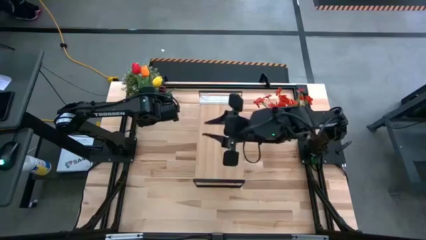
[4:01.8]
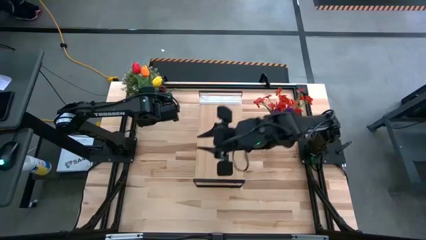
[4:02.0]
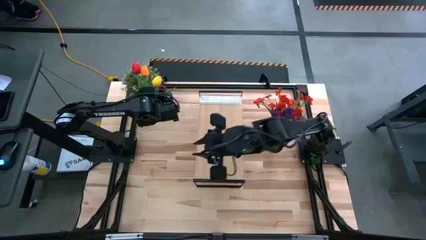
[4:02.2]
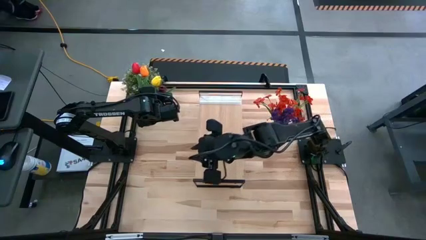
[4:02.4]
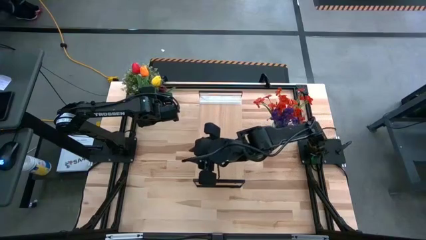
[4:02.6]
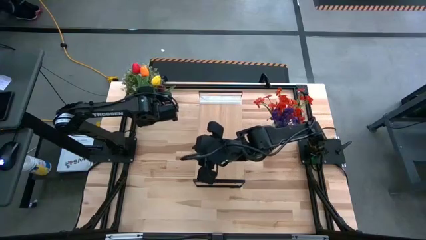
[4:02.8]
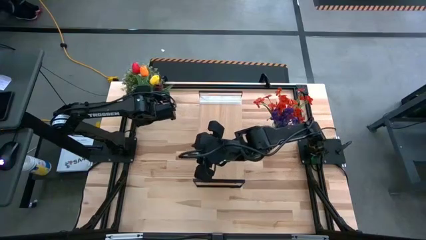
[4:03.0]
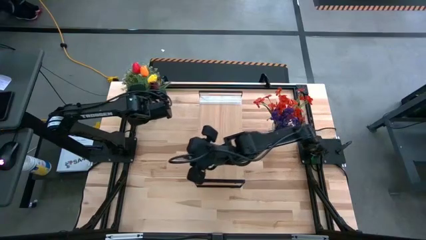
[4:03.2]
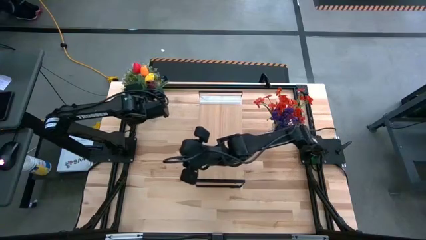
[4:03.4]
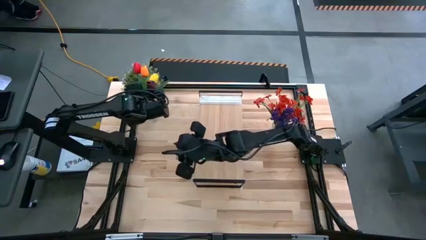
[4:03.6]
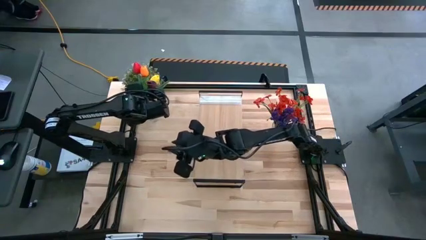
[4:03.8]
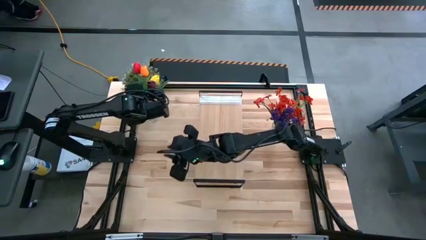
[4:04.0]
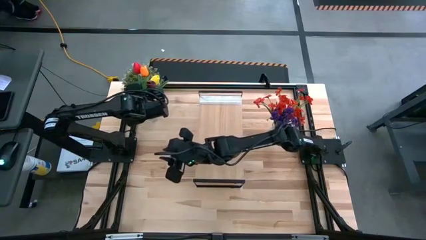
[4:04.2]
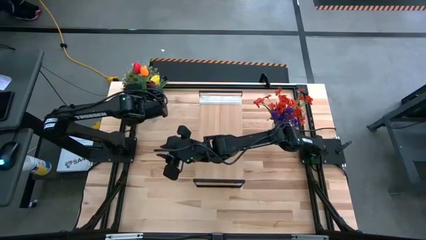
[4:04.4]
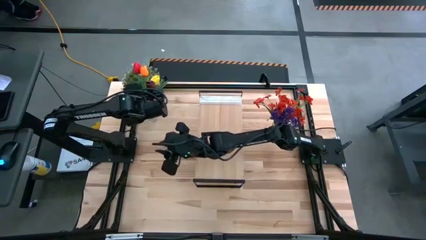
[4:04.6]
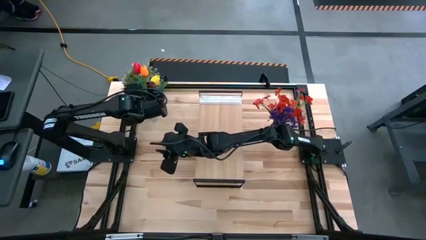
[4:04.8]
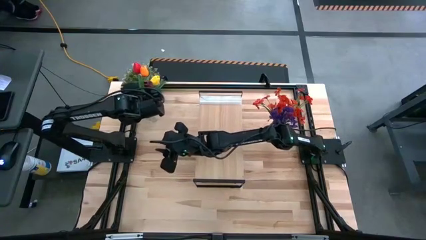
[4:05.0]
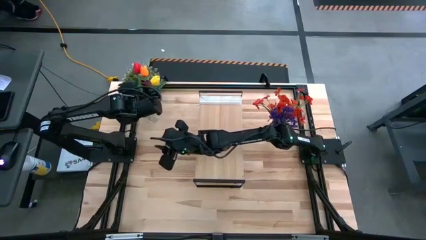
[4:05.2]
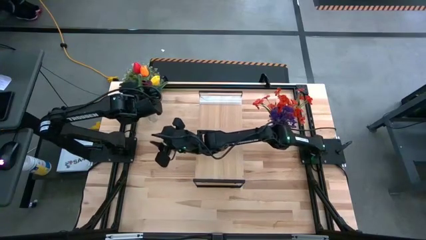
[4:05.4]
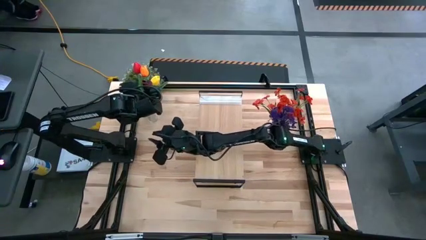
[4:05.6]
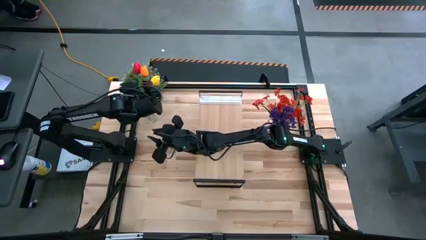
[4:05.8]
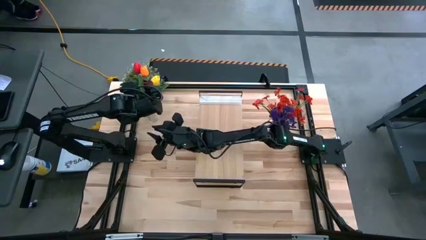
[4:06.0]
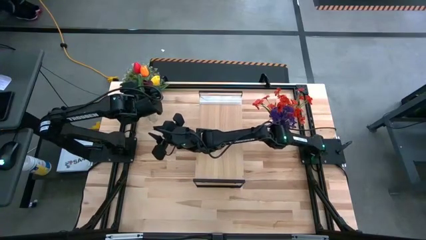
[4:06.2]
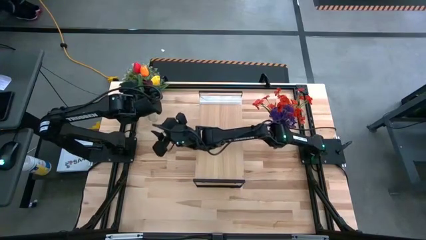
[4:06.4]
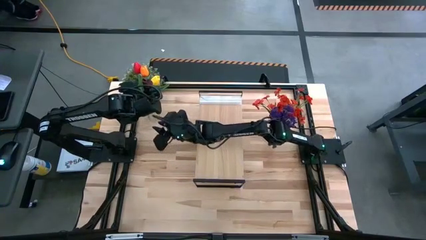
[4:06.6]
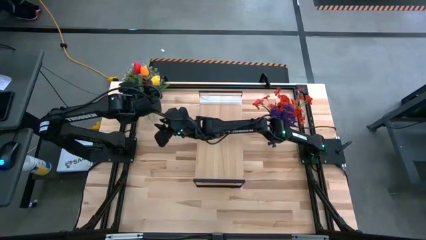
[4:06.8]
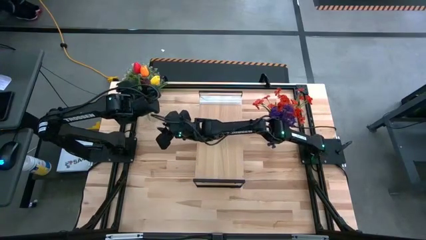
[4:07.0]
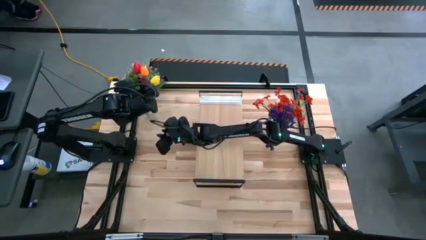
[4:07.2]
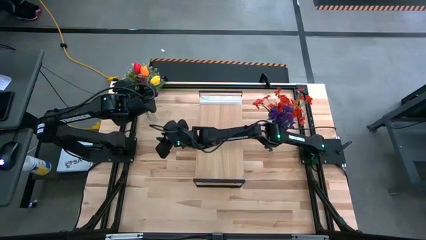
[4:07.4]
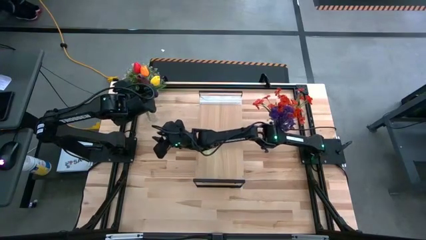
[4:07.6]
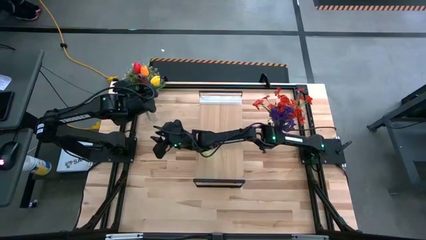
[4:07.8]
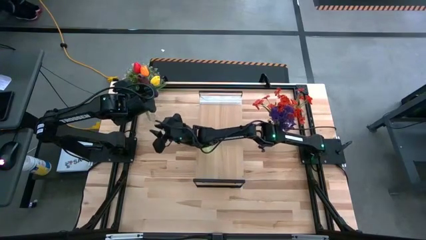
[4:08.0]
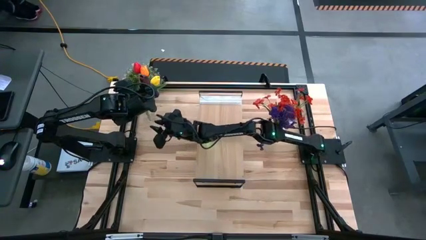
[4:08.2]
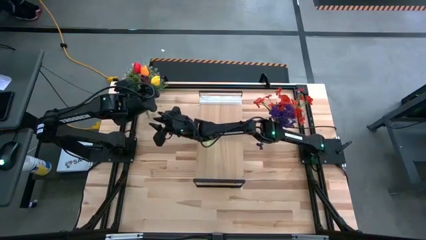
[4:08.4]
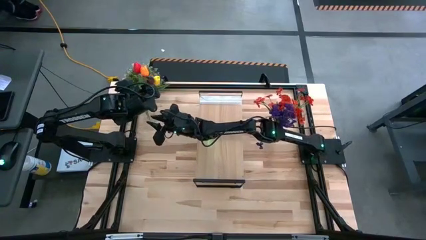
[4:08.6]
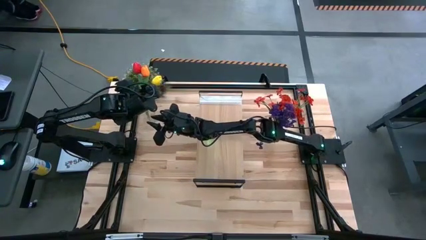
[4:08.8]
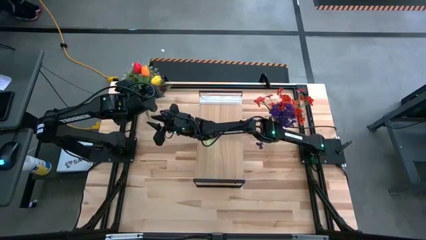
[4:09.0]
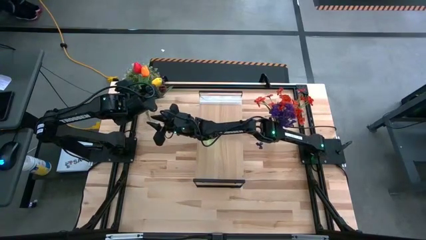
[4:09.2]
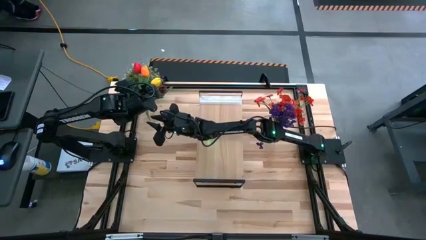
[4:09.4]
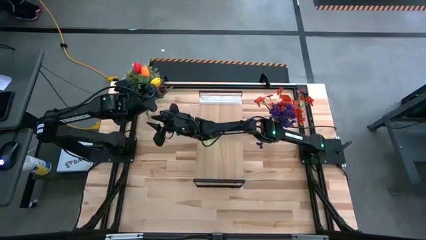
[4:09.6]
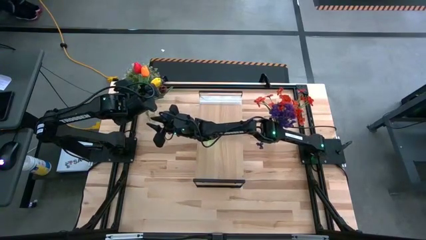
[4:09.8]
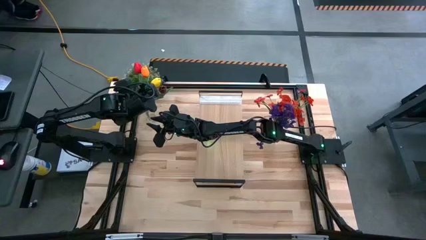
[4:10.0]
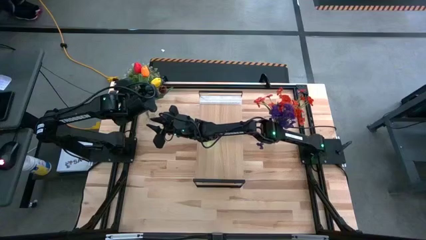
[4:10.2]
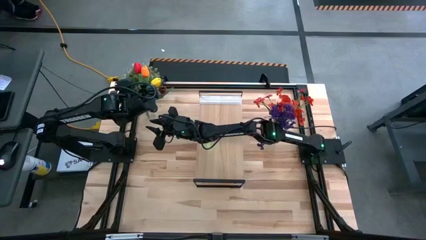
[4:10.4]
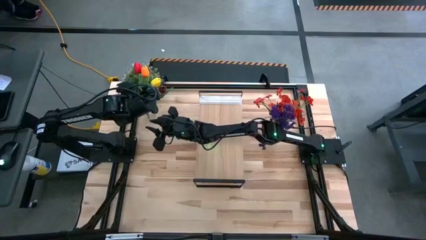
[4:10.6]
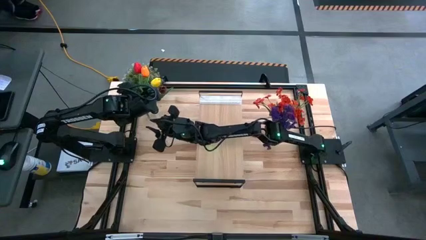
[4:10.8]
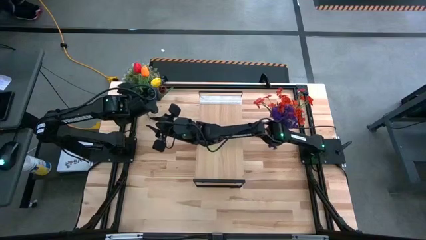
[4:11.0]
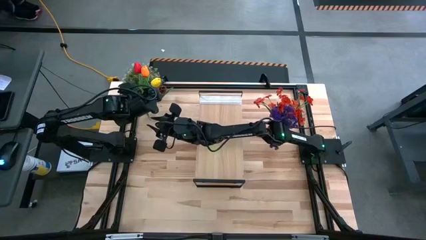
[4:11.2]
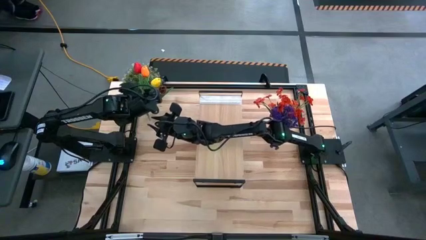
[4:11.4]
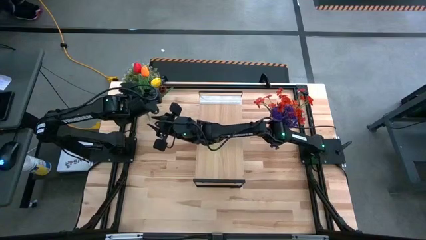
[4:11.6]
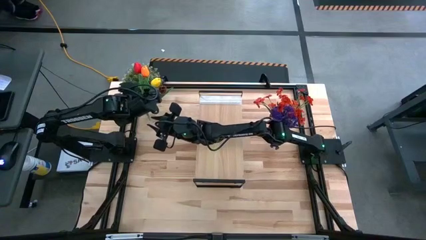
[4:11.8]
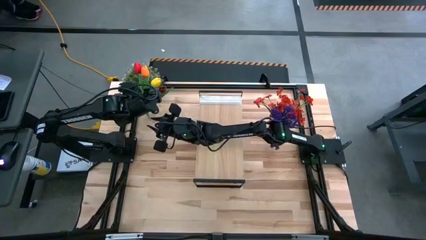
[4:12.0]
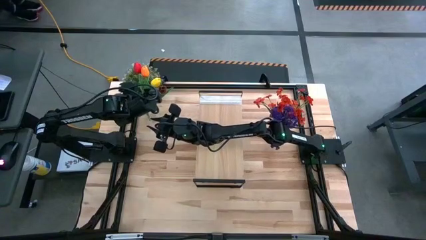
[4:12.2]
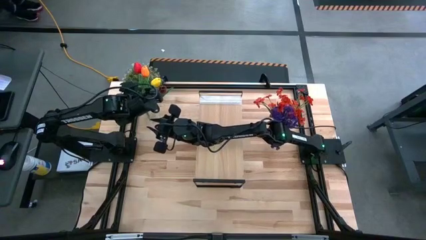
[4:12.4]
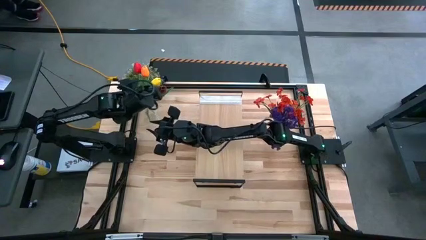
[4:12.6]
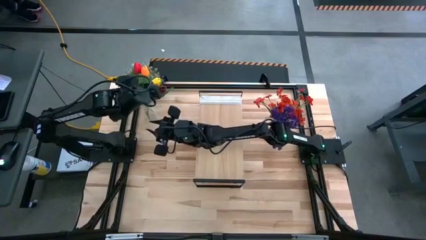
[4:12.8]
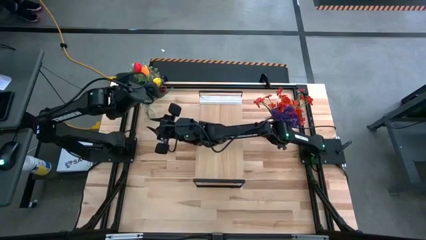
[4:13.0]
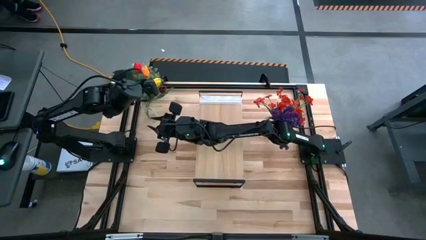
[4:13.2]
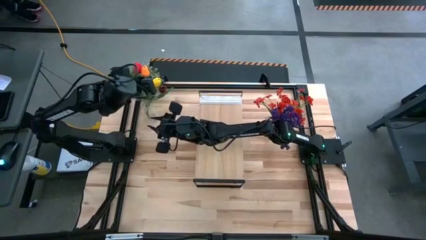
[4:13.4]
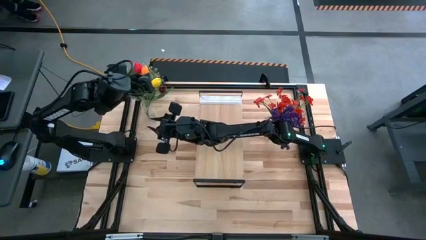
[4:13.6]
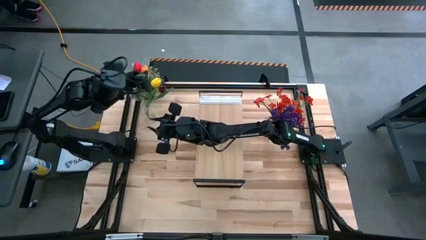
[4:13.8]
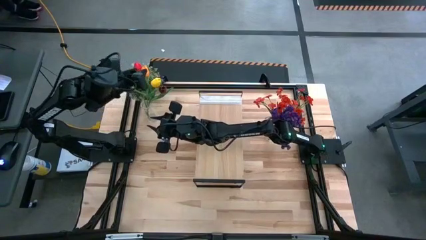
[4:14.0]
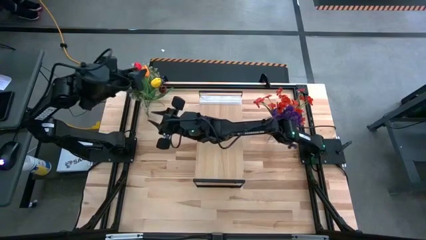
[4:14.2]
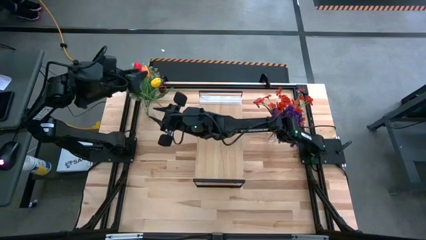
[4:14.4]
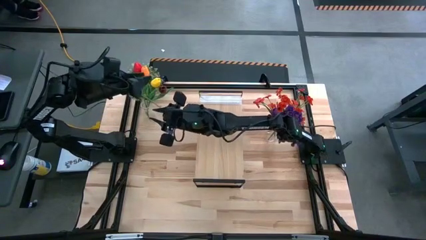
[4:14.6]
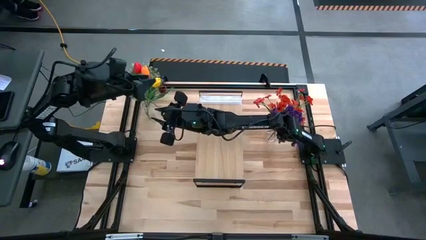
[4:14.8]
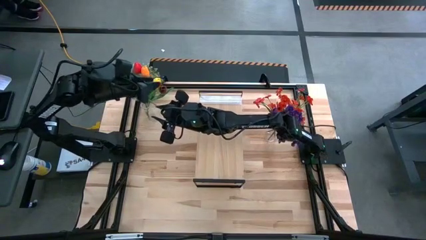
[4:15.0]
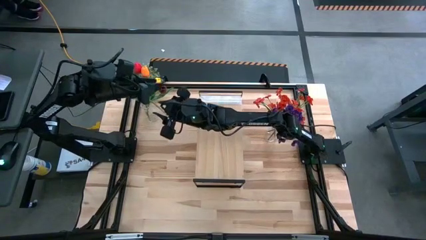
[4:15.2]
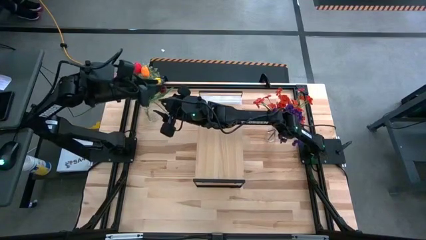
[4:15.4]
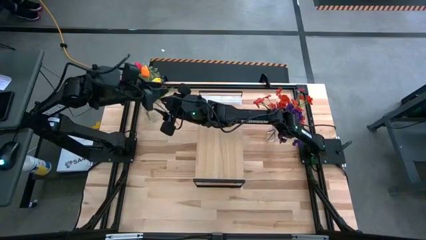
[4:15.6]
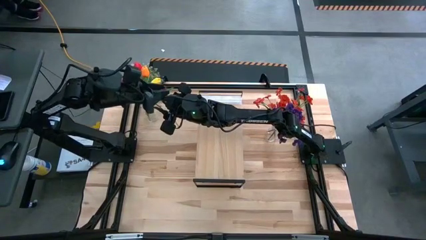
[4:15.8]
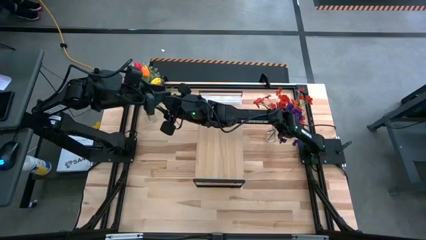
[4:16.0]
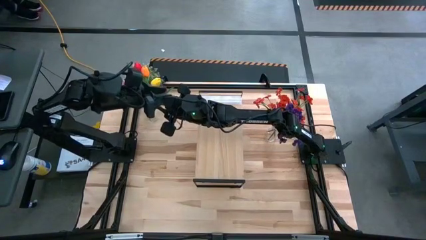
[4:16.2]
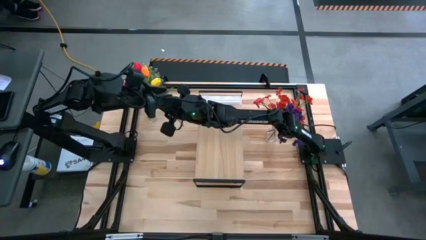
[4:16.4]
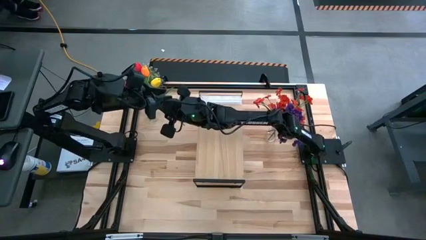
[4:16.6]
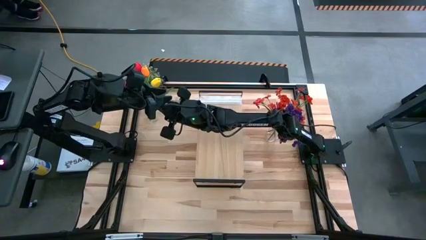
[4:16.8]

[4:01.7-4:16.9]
Task: Pick and place flowers into a vace then onto a shelf
Put the pink tulip into the left transparent vase

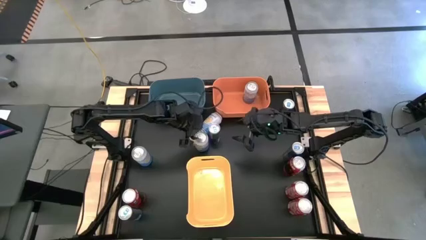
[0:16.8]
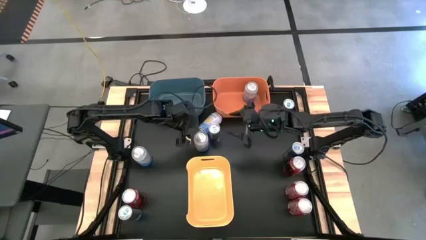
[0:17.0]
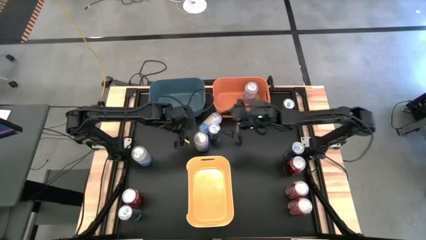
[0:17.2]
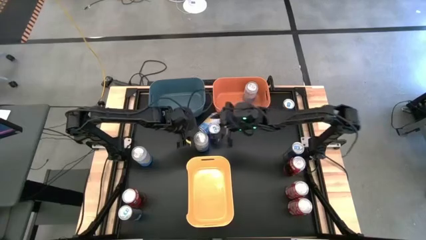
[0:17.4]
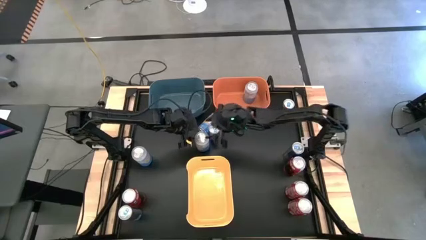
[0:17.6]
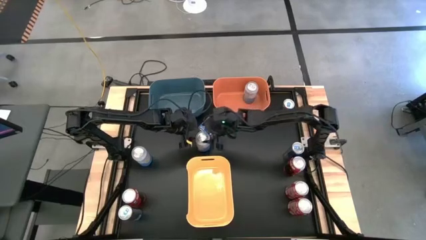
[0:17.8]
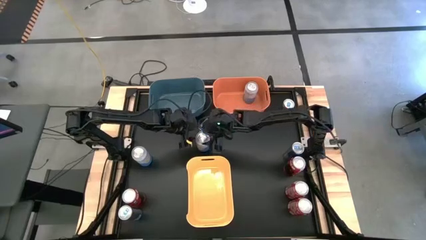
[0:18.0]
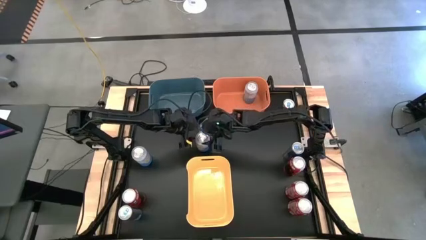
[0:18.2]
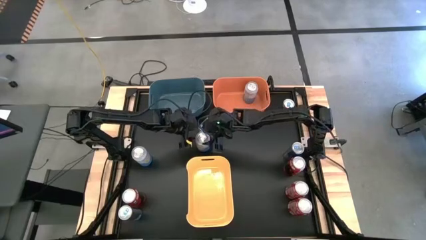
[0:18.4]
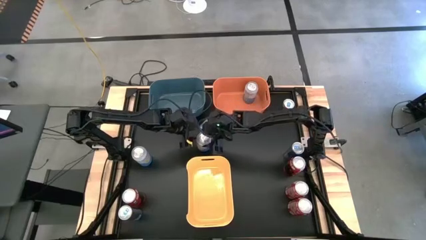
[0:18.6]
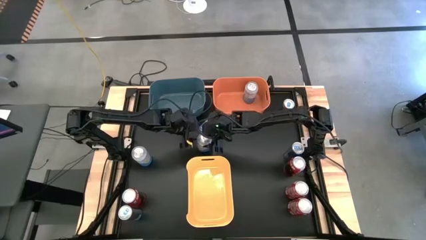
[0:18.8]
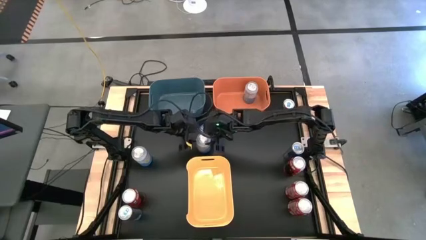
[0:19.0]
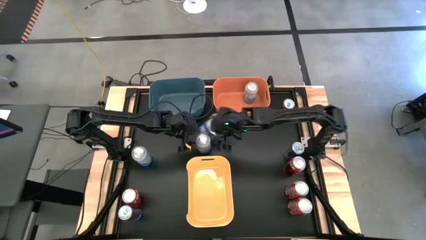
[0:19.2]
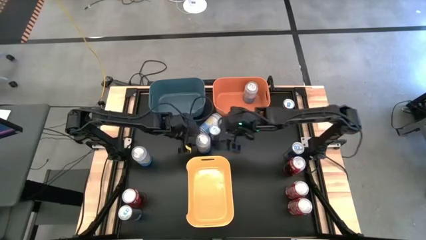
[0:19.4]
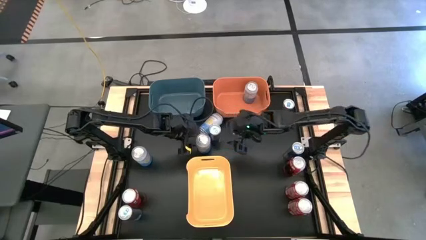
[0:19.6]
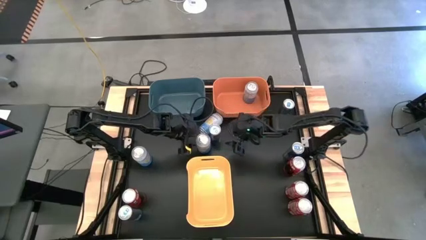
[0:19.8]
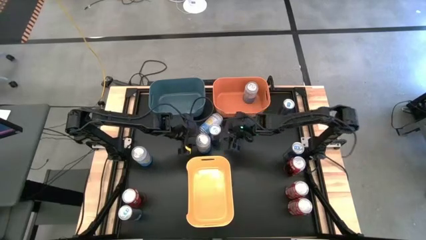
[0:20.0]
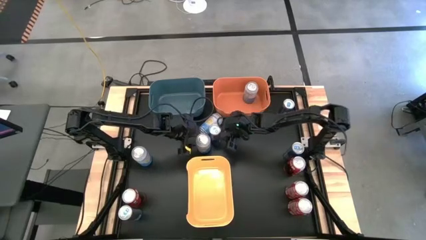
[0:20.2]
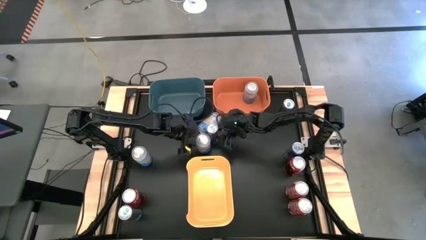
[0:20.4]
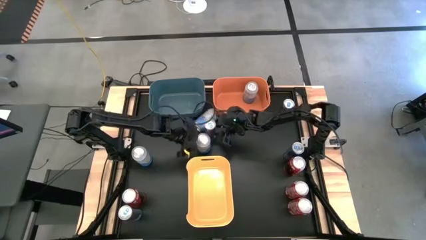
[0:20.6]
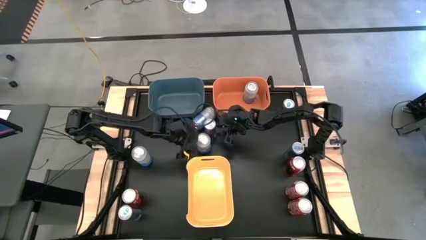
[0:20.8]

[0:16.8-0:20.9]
Task: Sort soda cans
Adjust the blue soda can
